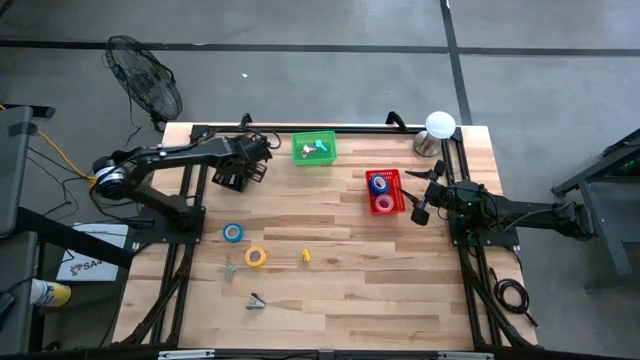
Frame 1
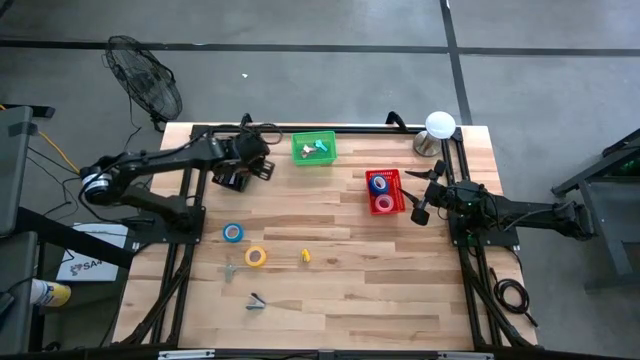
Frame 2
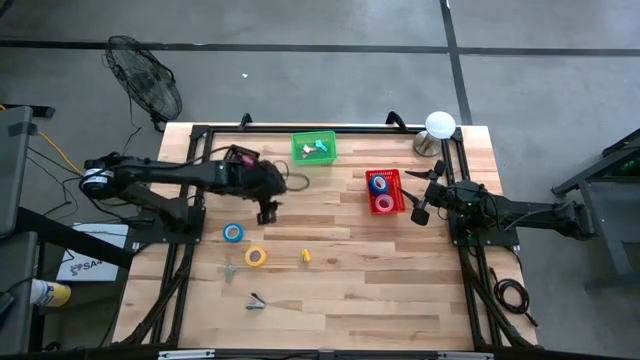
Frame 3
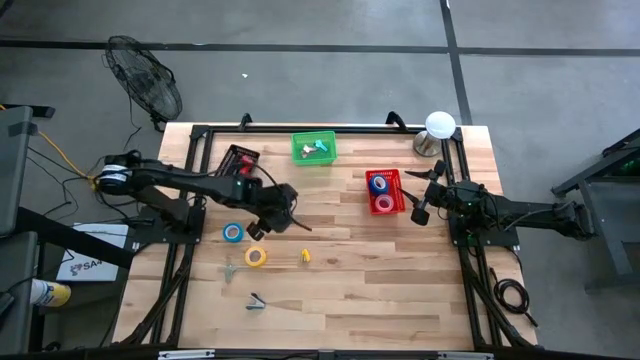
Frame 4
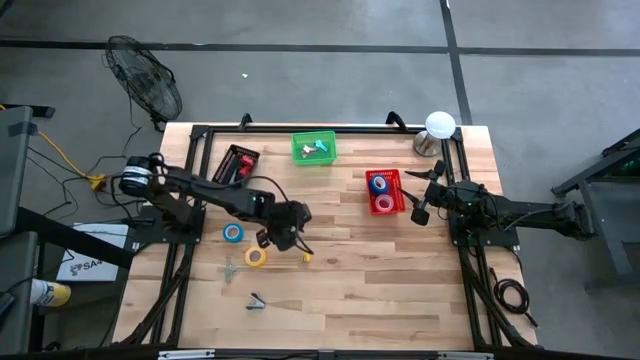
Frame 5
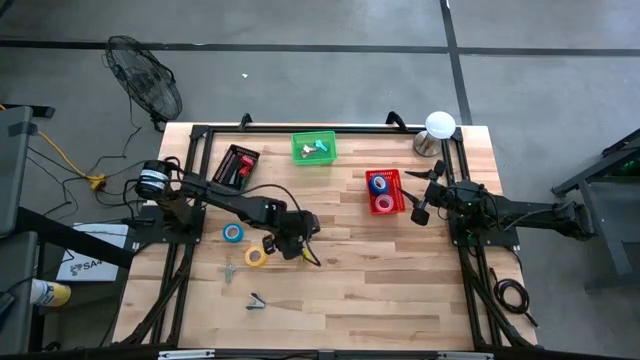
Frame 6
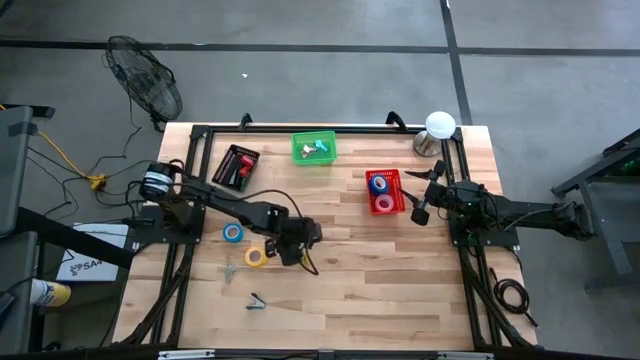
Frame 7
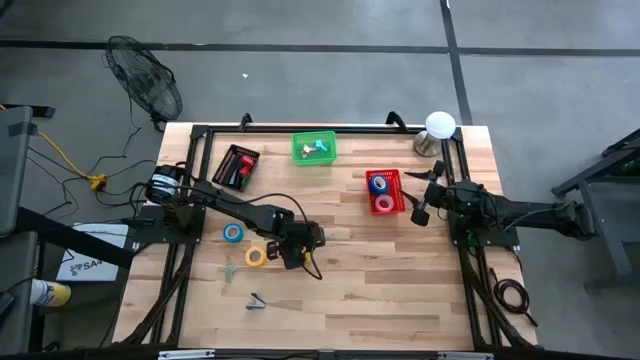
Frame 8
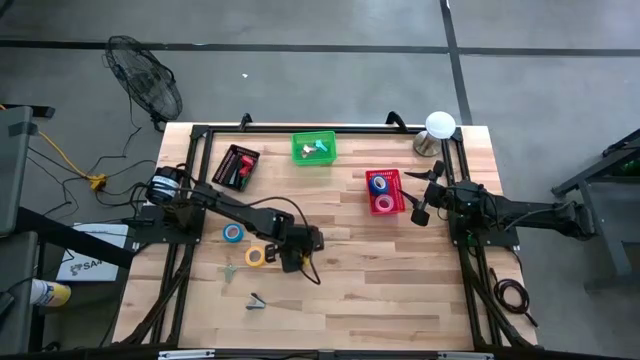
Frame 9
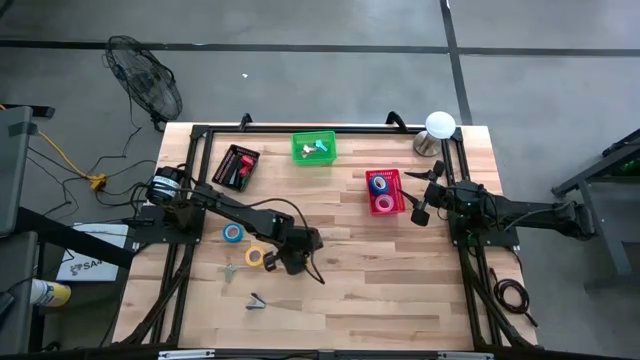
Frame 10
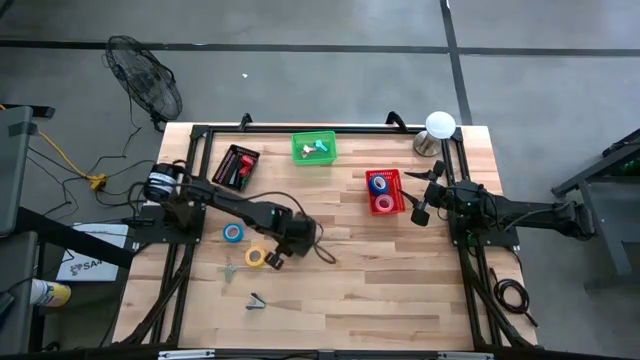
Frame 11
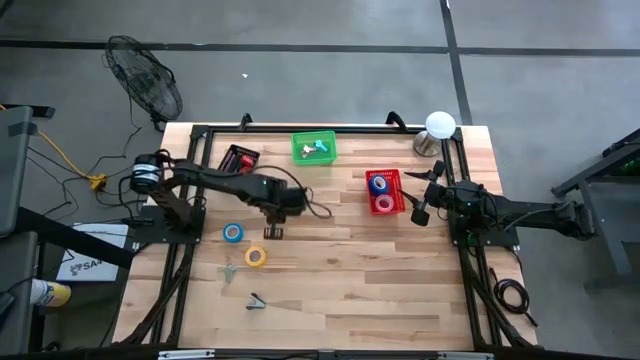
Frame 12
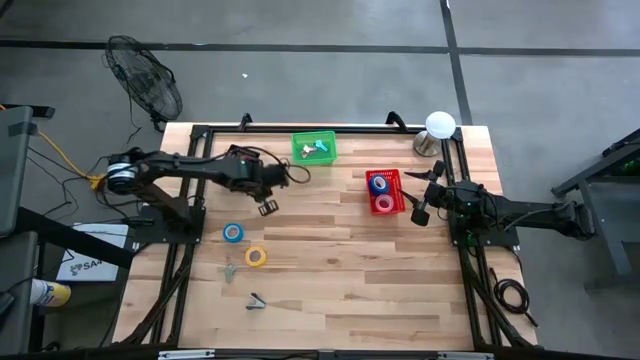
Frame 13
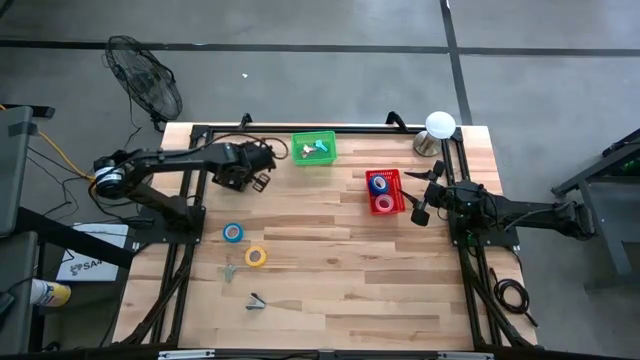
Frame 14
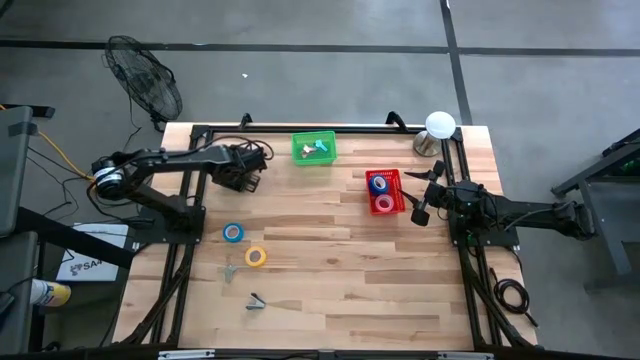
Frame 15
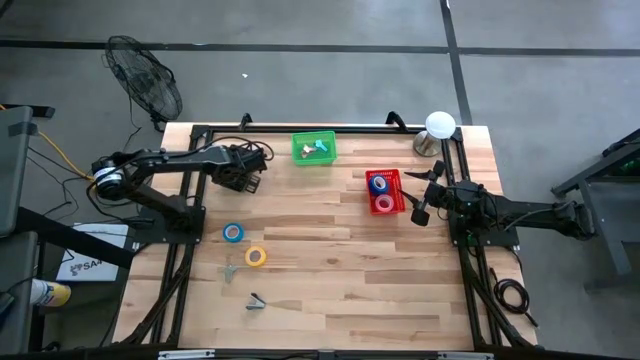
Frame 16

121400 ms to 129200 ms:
Task: Pick and place Stapler, Stapler remover, tape
Put the yellow stapler into the black bin

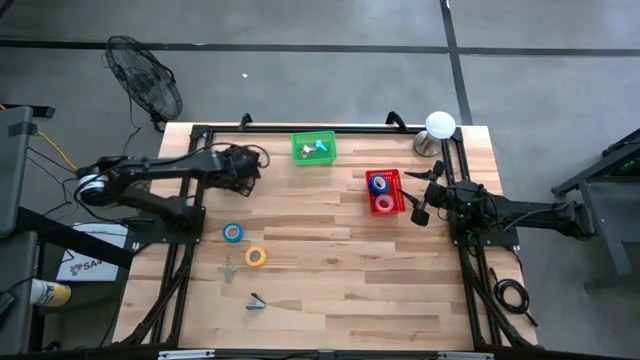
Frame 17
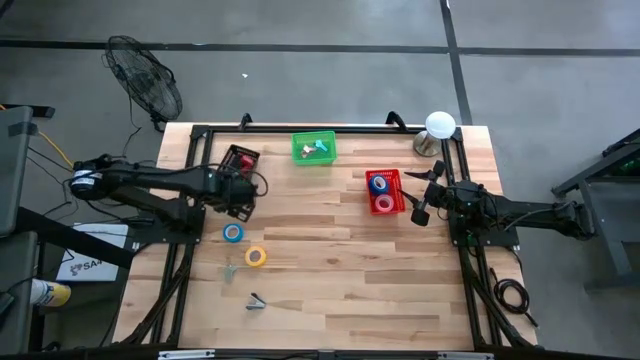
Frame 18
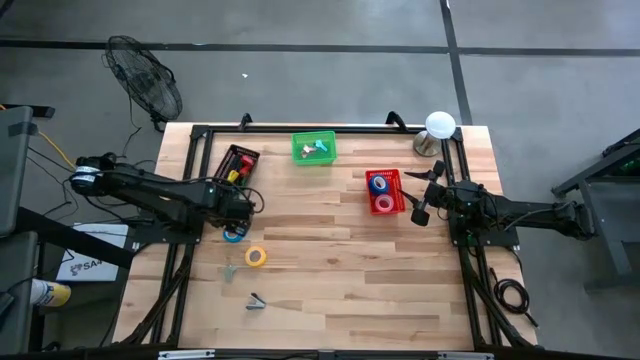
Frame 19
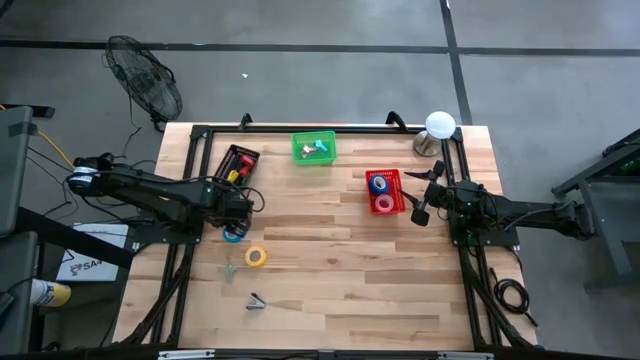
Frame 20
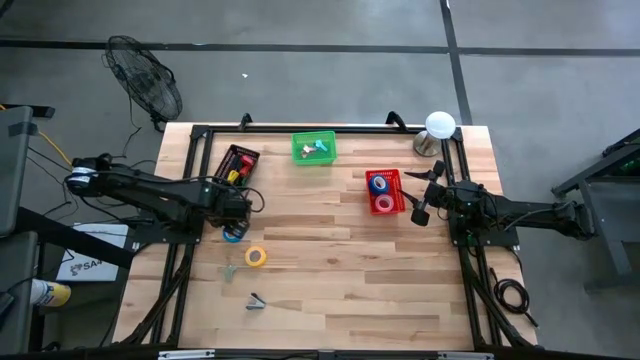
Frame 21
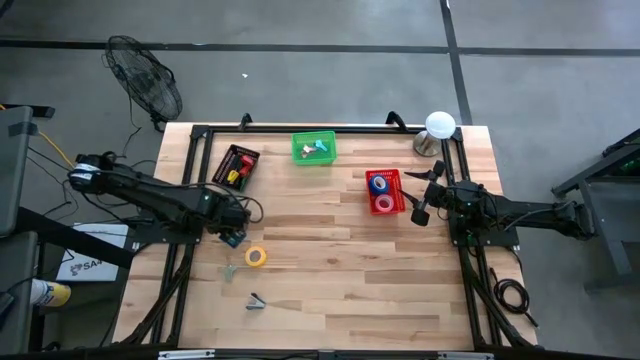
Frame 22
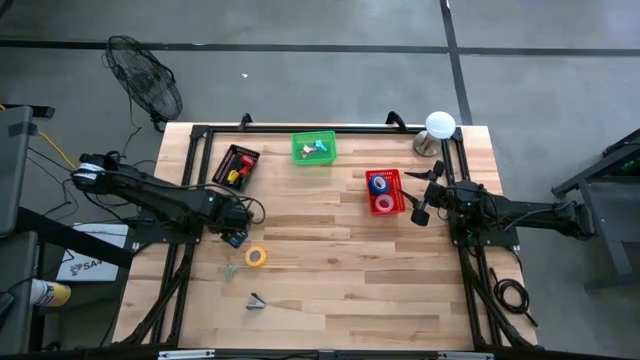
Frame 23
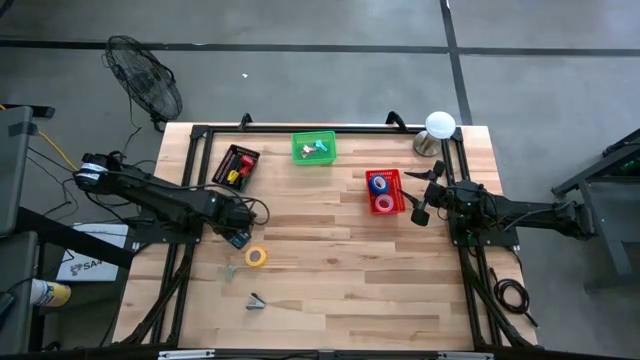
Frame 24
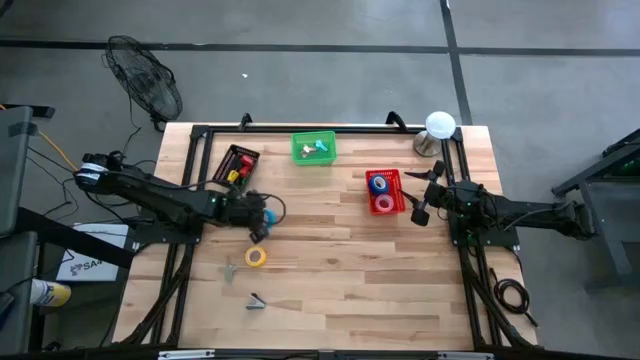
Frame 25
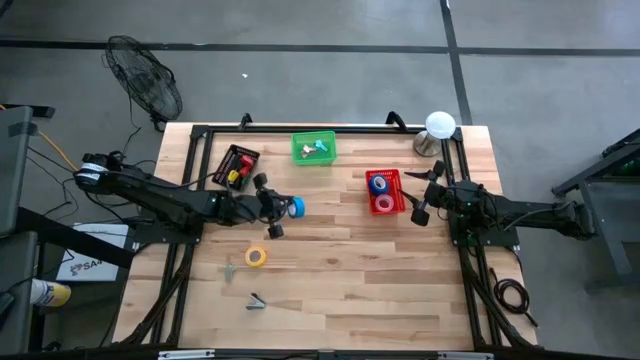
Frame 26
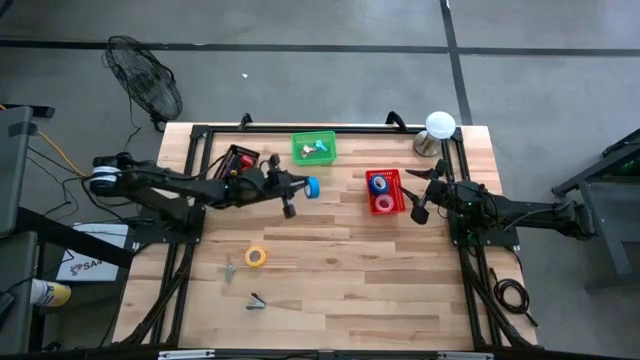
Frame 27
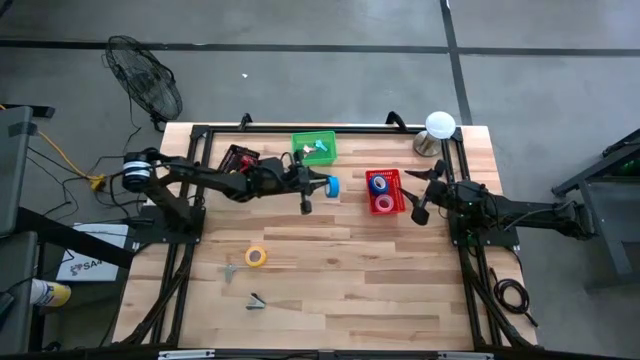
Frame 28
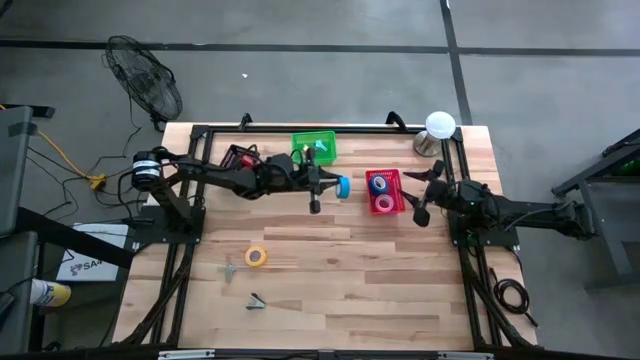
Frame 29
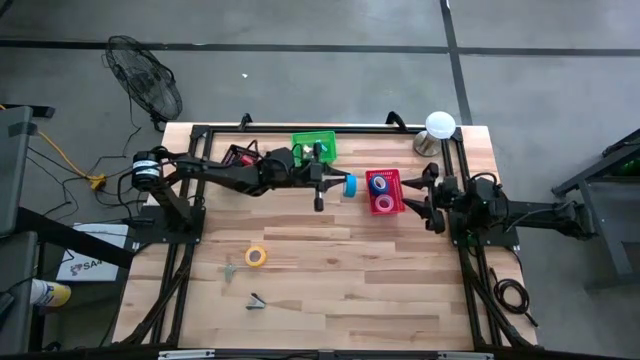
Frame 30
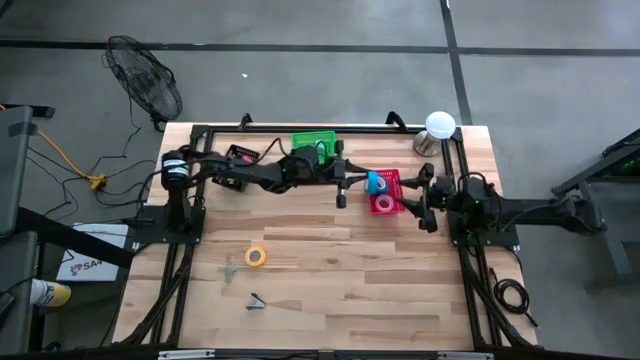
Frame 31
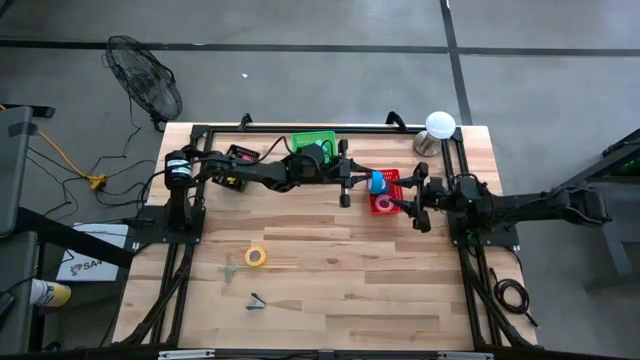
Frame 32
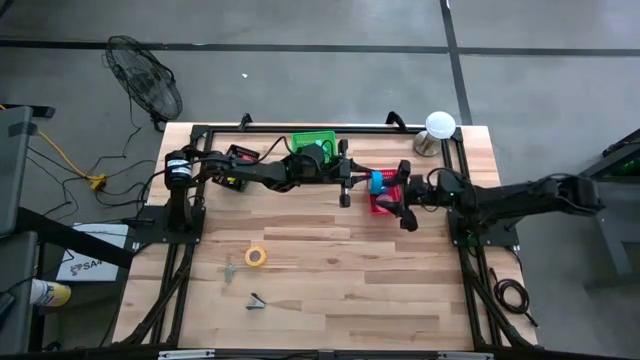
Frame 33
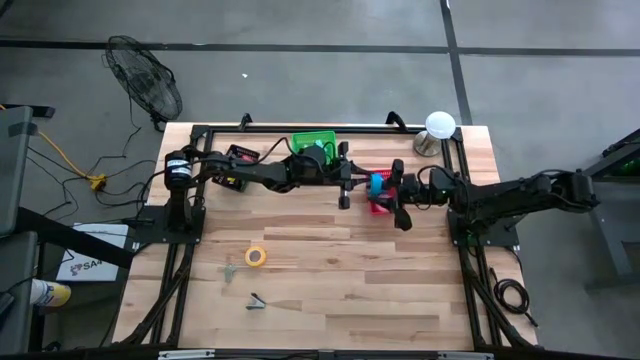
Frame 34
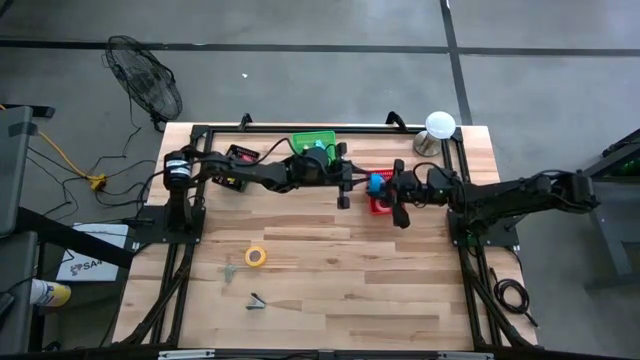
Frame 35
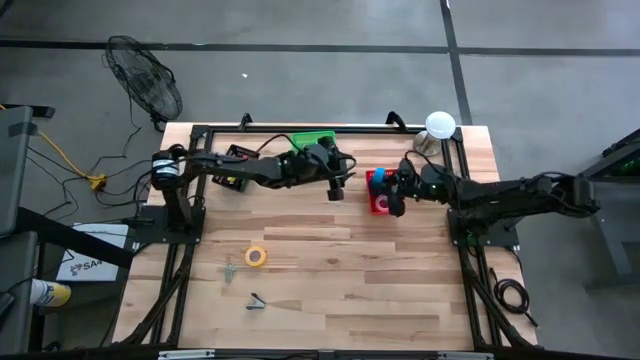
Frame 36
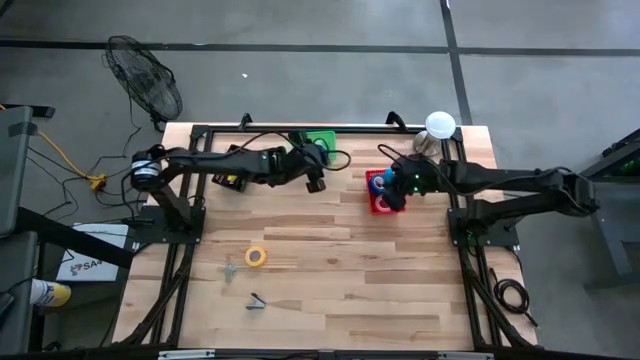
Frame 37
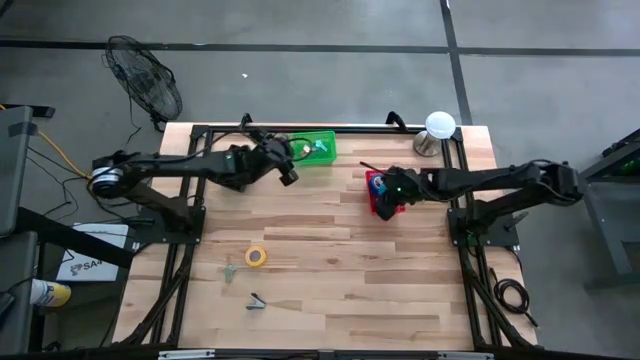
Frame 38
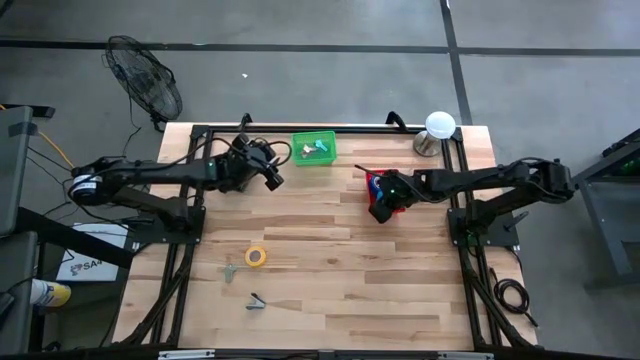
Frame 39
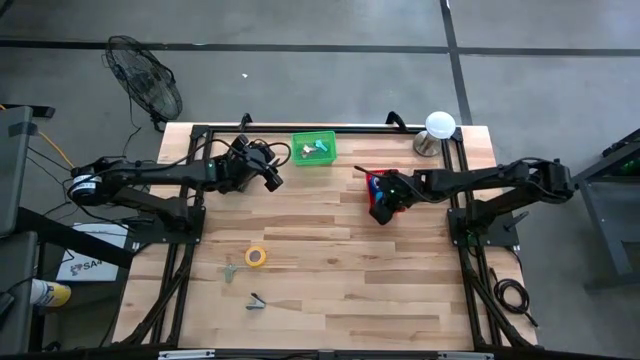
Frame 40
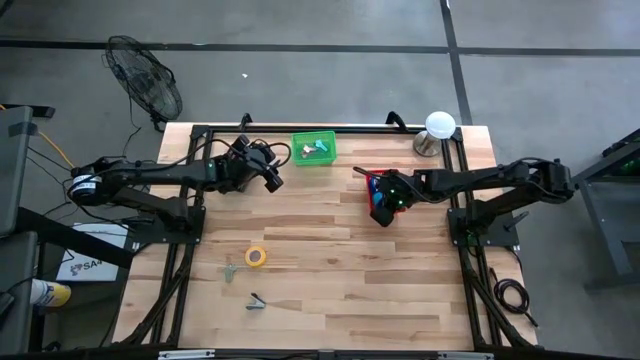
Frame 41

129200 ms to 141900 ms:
Put the blue tape into the red bin
